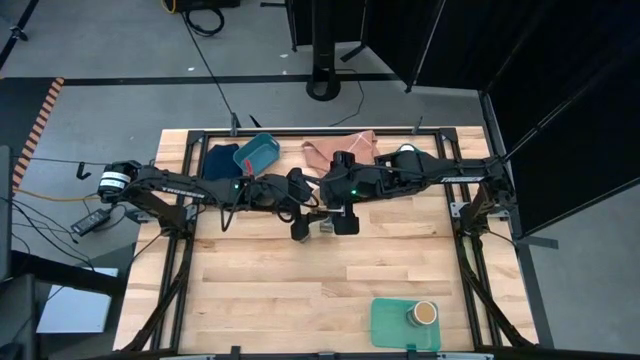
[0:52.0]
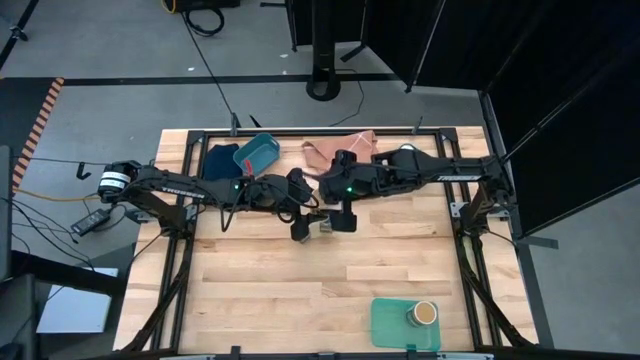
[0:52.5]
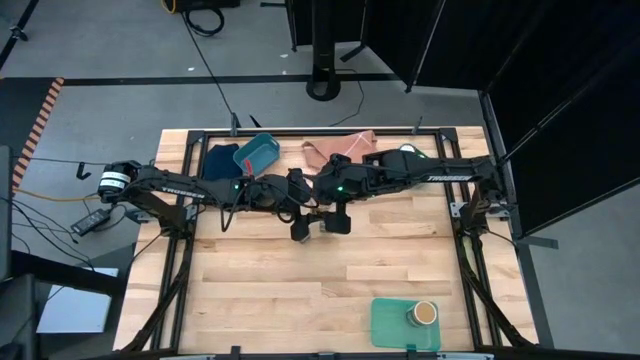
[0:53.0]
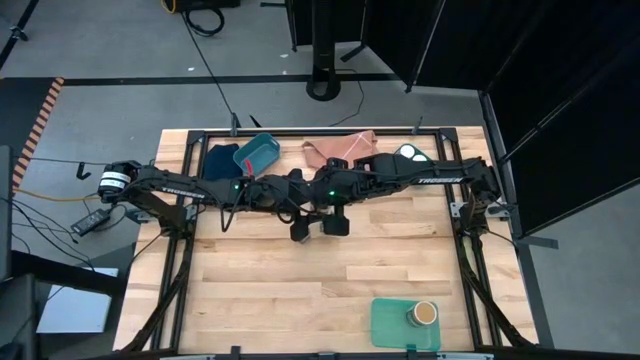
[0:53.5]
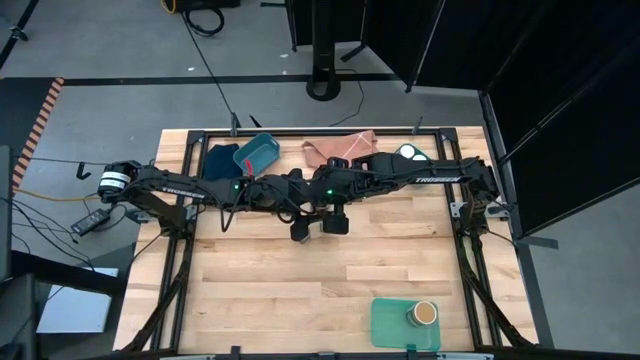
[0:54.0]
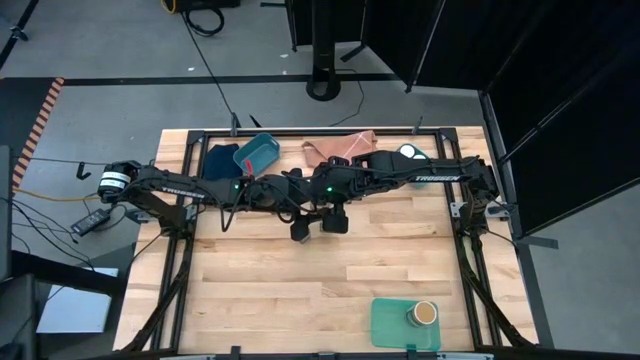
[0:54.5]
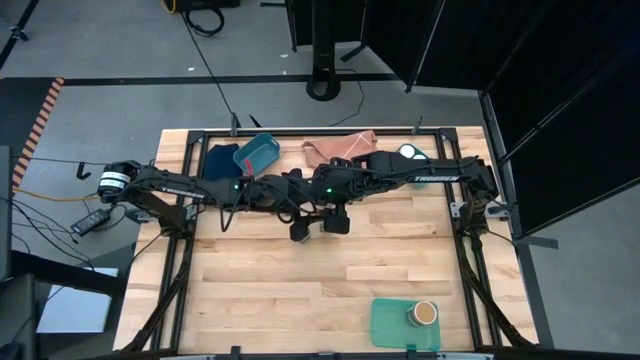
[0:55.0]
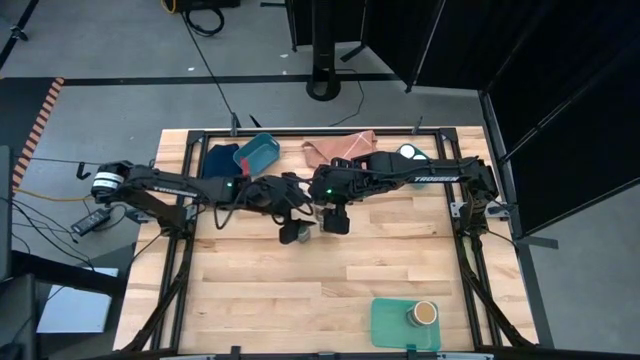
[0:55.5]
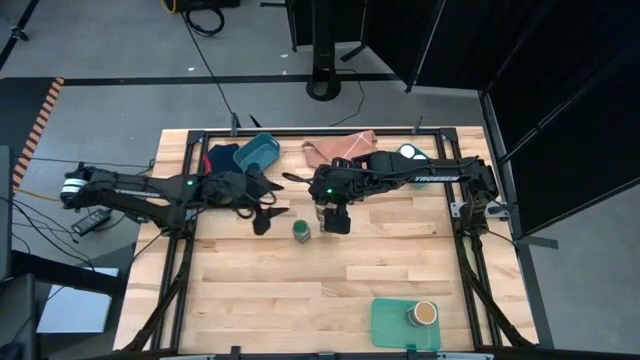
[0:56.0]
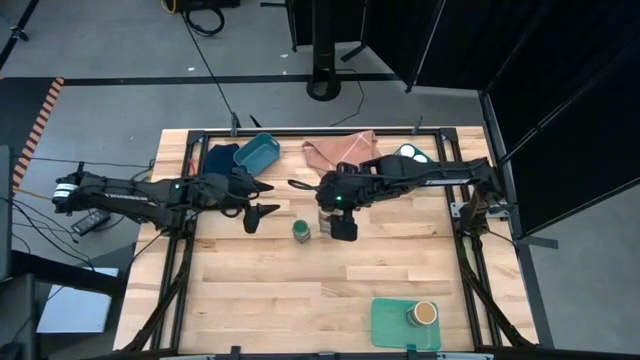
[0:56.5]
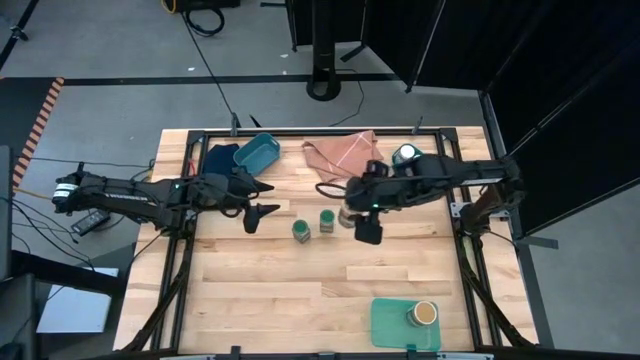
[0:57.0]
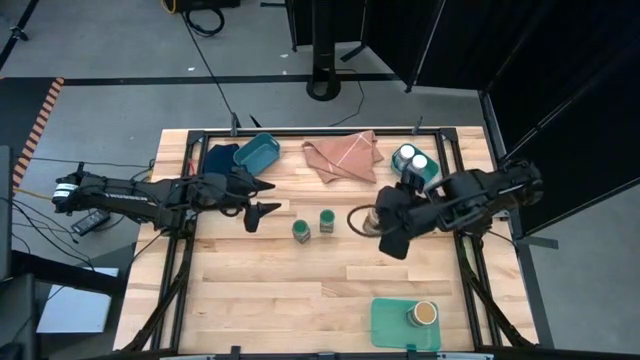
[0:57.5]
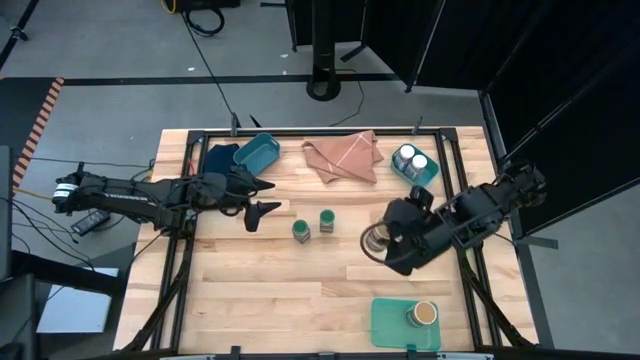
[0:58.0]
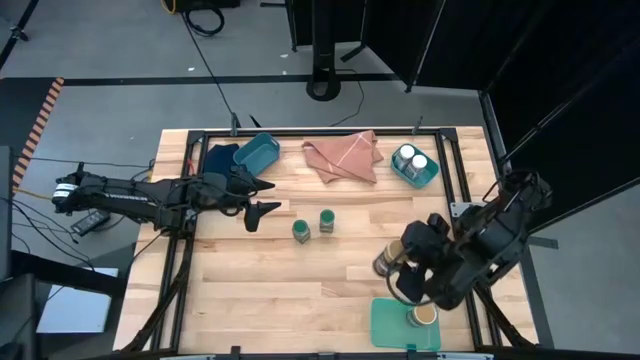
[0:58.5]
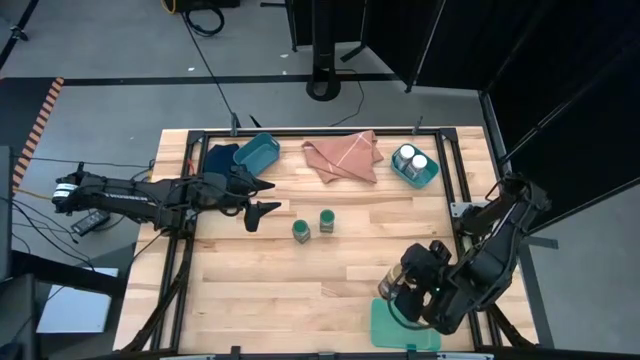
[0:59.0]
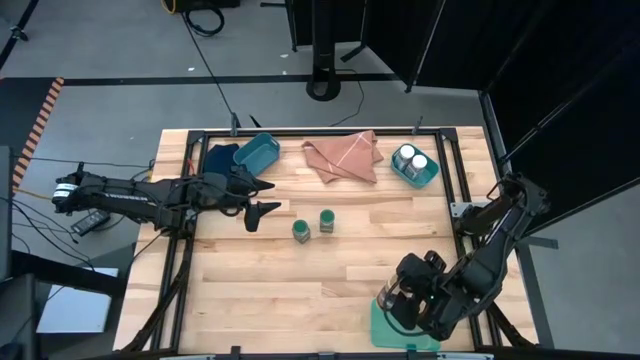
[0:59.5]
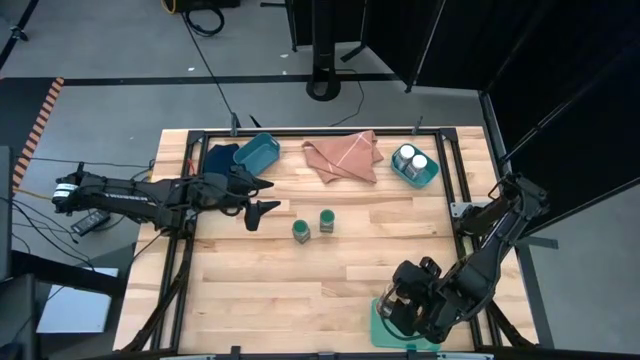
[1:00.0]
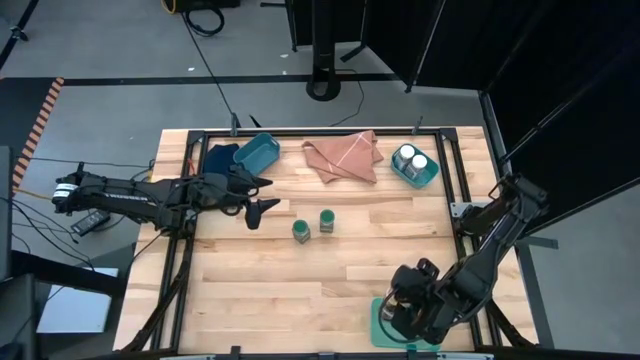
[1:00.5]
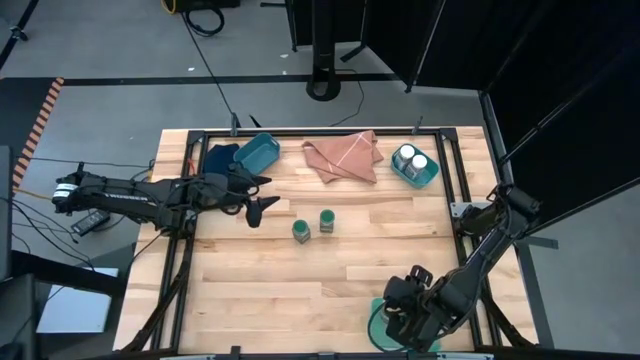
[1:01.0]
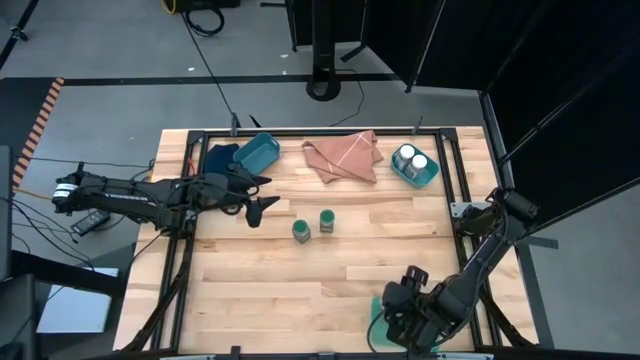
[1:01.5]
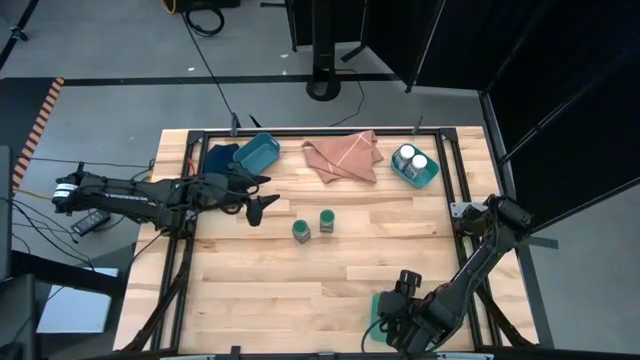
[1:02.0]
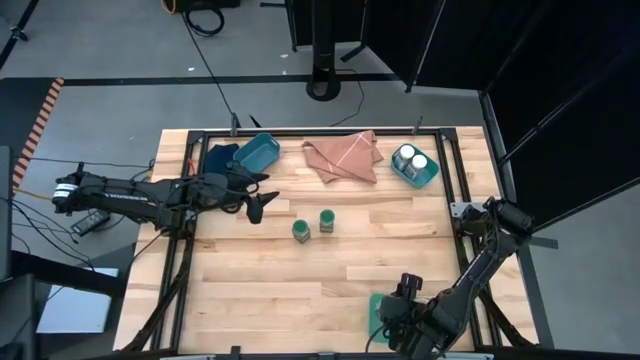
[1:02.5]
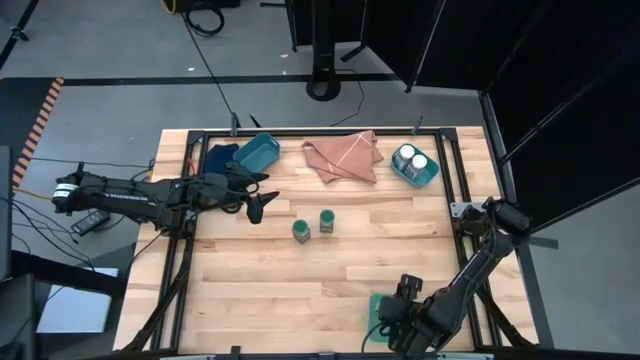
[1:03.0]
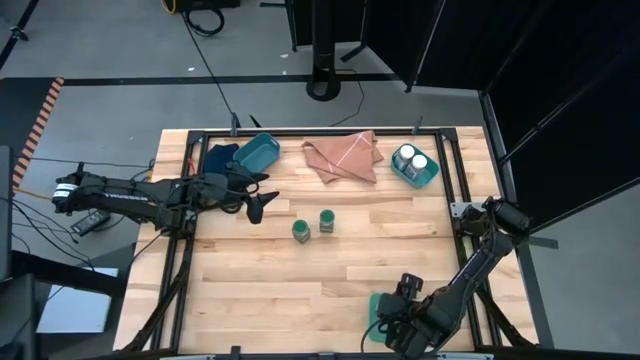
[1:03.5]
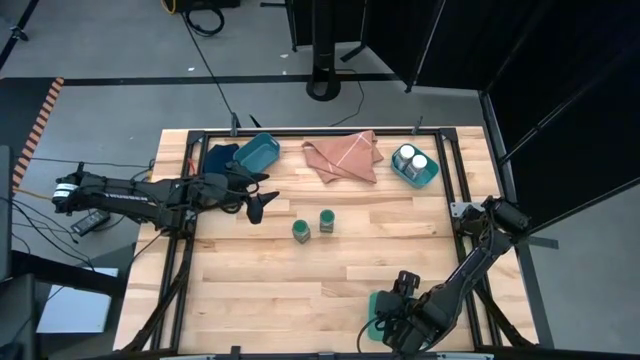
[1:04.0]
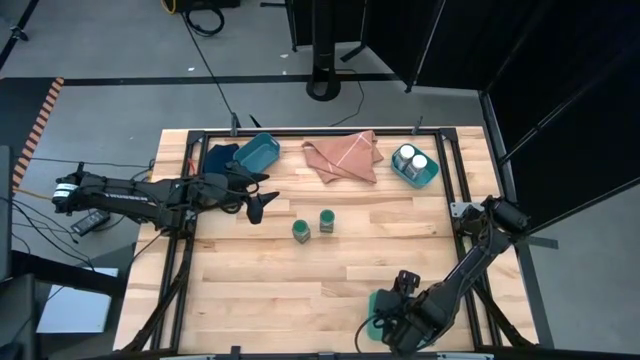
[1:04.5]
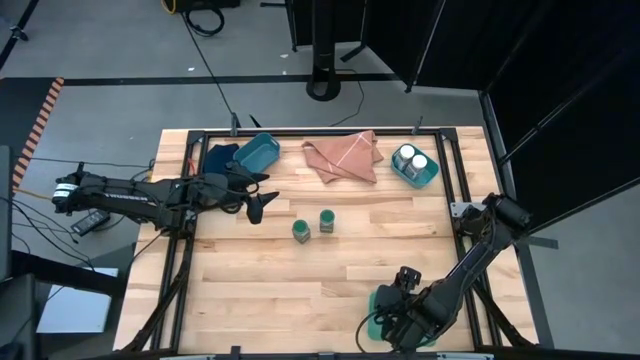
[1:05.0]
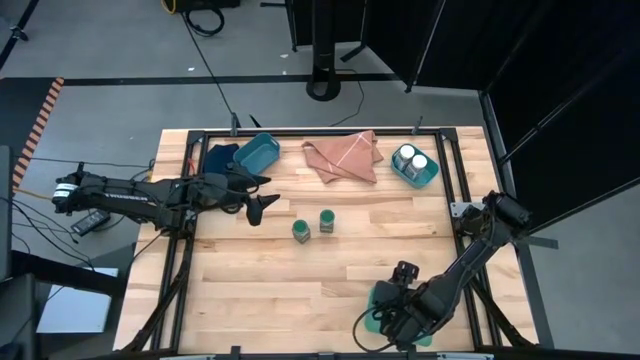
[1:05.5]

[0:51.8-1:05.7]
Task: Sort spices by type
Put the gold seasoning bottle into the light green bin

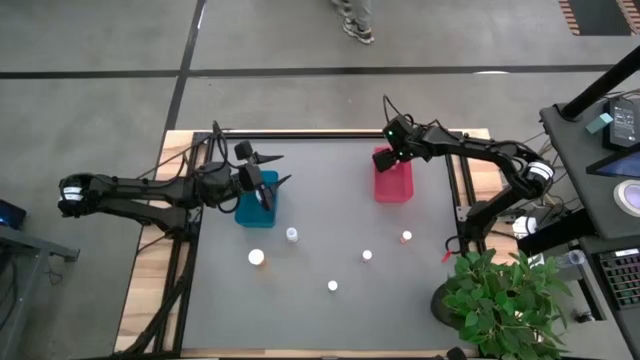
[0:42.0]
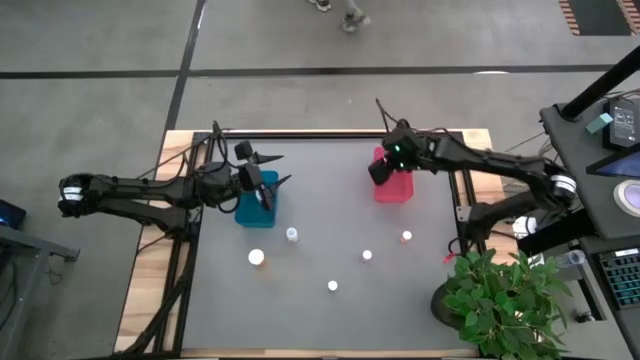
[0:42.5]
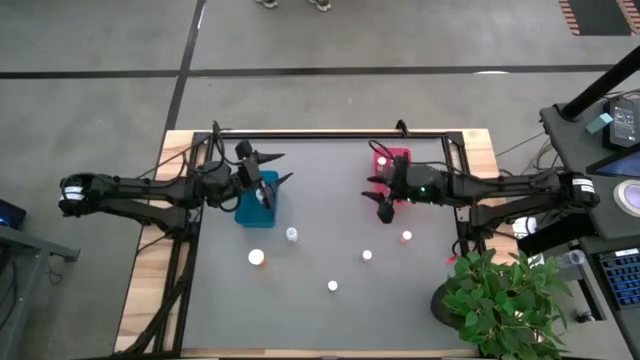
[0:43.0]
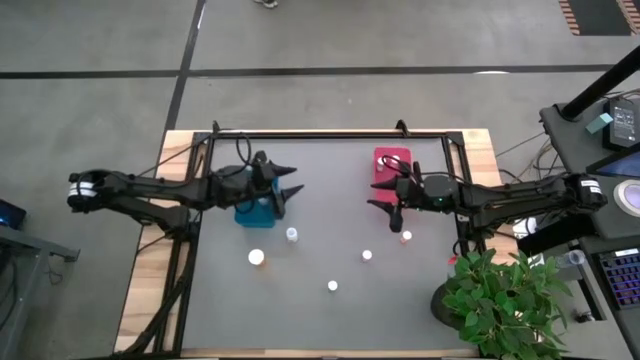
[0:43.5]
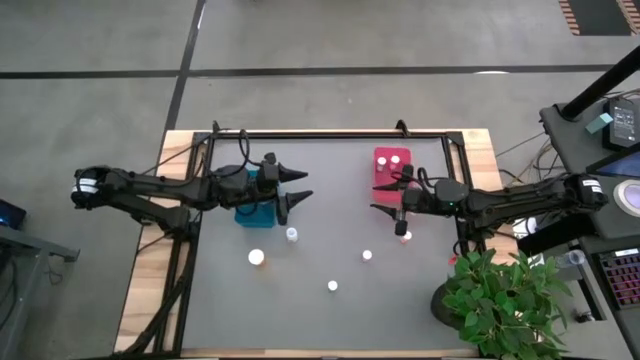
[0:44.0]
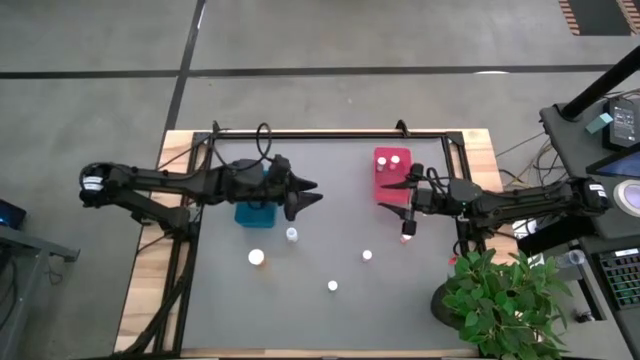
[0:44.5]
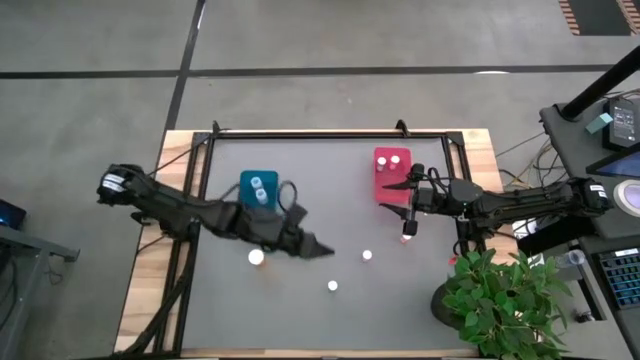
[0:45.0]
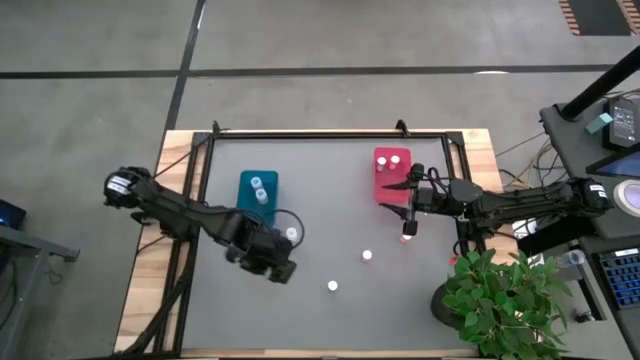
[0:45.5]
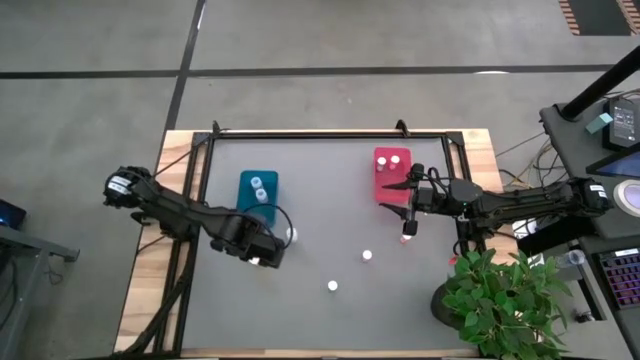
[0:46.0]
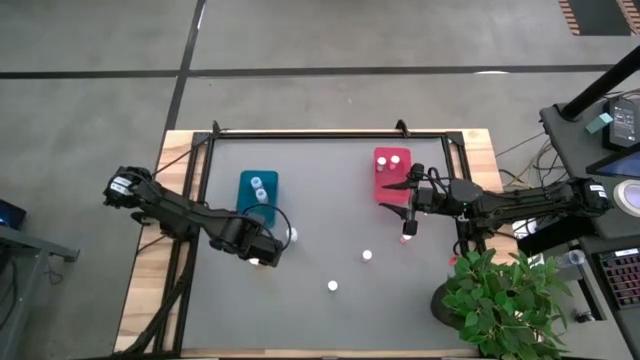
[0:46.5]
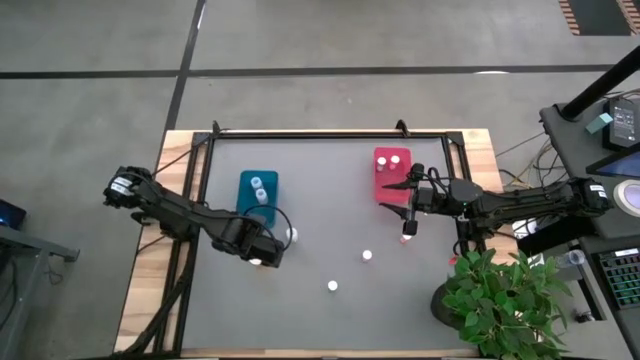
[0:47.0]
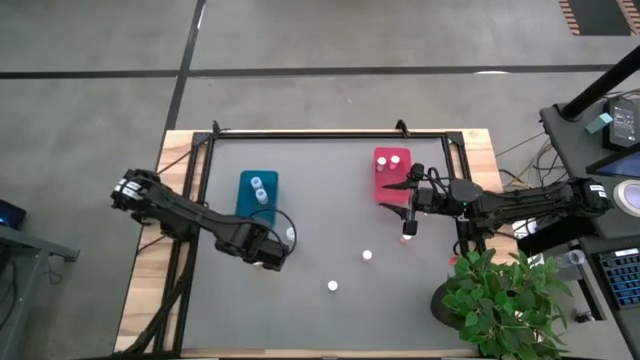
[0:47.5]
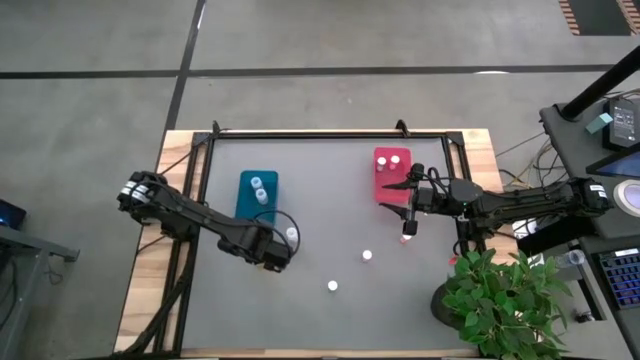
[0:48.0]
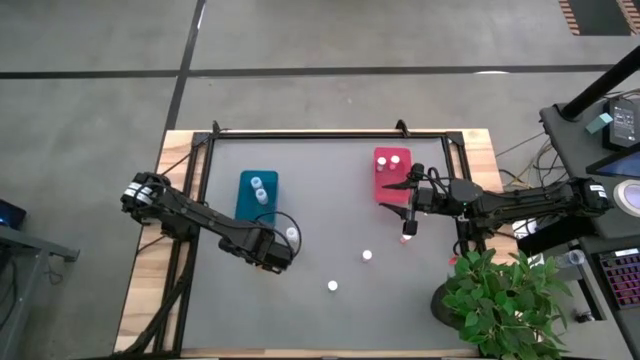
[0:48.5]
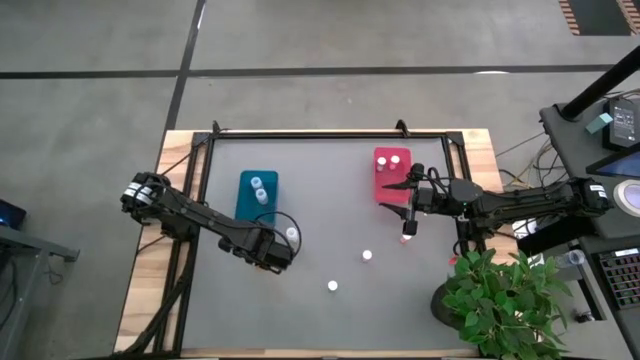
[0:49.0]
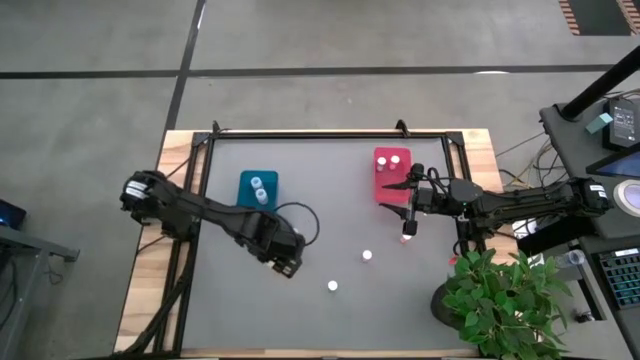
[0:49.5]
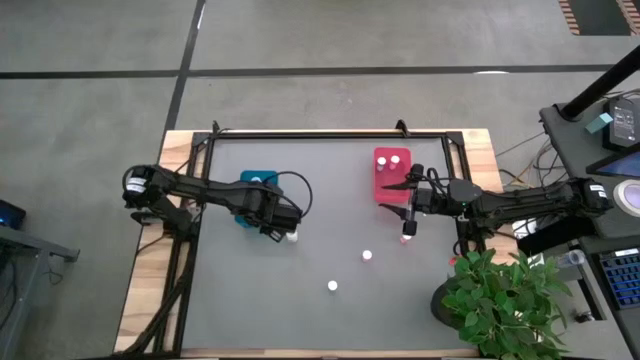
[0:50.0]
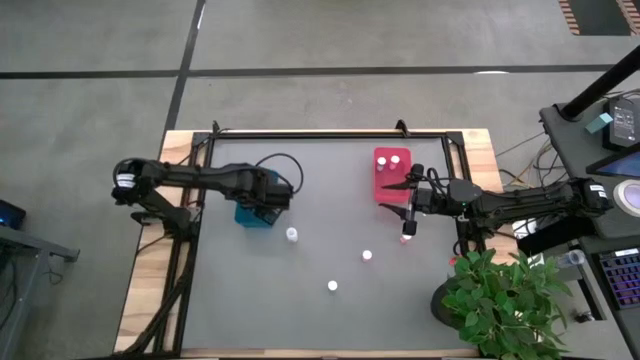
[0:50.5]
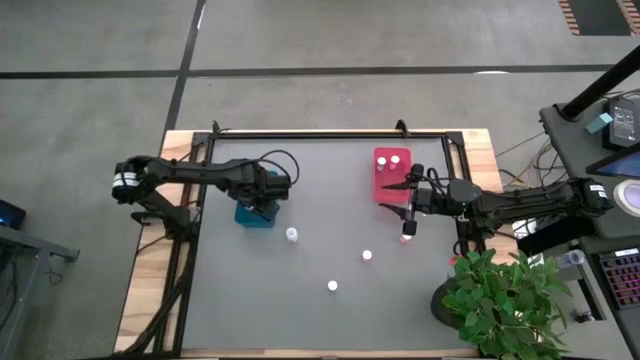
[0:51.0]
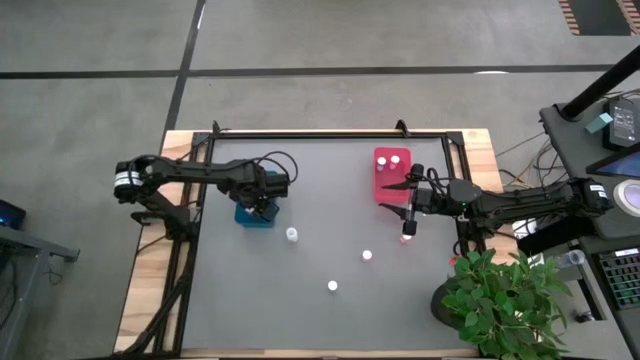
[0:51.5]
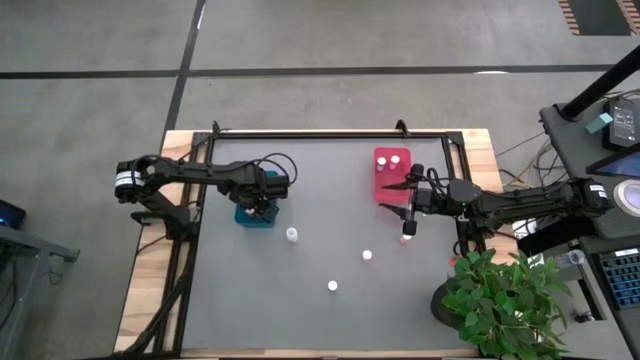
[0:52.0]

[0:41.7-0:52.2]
Task: Pick and place medicine bottles into bin by pill shape (circle, oval)
Put the orange capsule bottle into the blue bin
